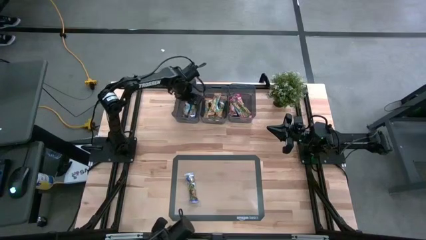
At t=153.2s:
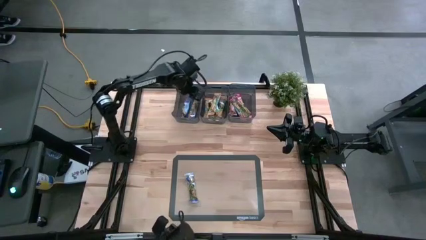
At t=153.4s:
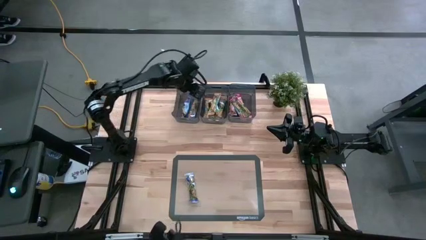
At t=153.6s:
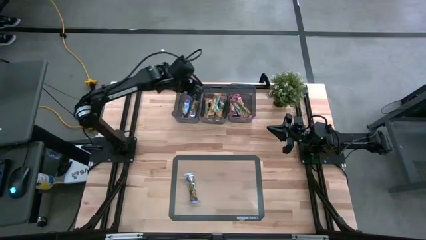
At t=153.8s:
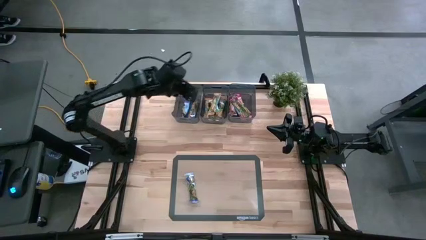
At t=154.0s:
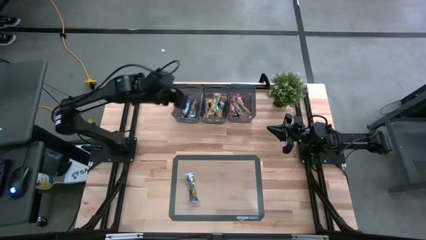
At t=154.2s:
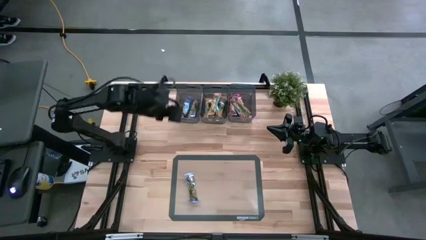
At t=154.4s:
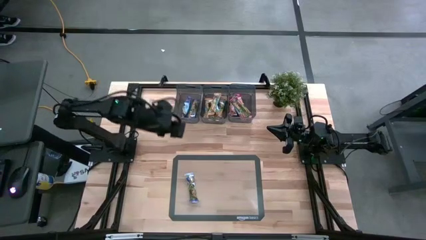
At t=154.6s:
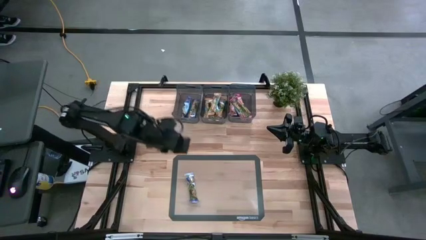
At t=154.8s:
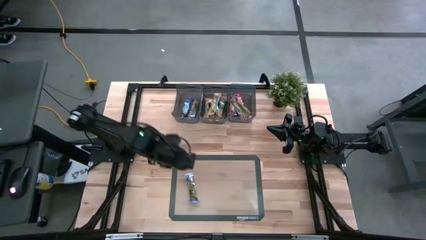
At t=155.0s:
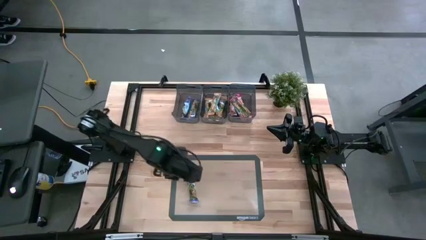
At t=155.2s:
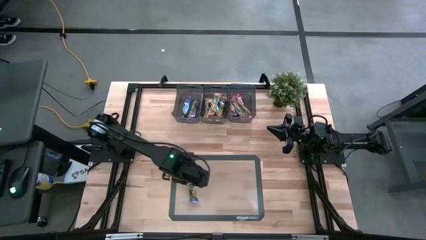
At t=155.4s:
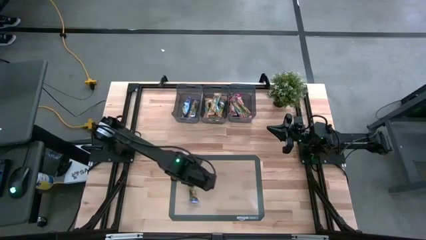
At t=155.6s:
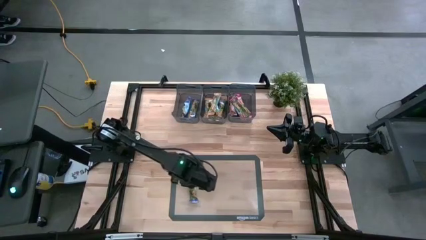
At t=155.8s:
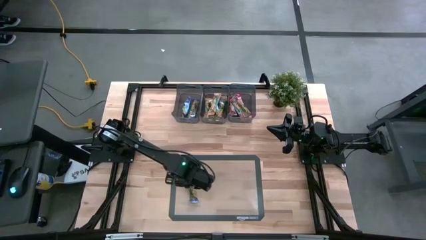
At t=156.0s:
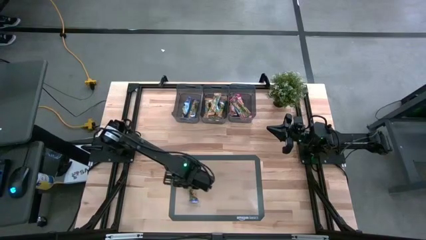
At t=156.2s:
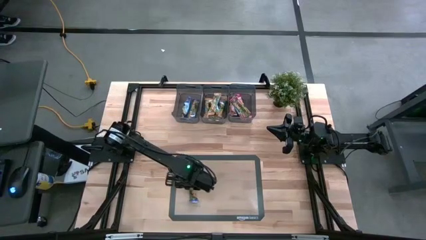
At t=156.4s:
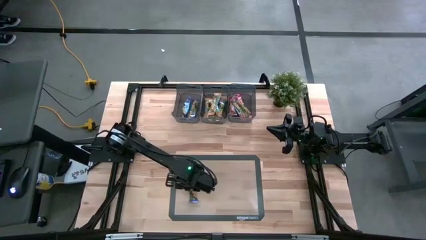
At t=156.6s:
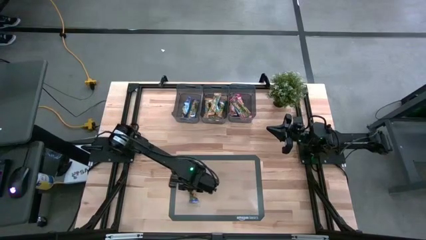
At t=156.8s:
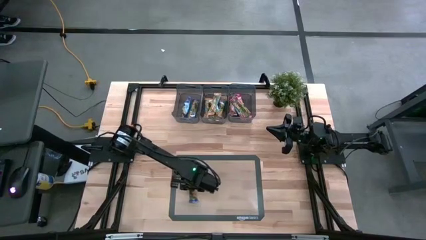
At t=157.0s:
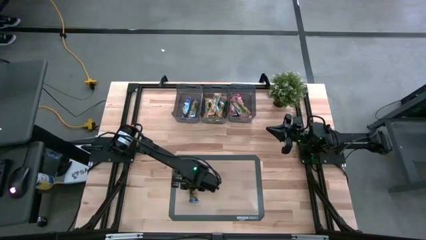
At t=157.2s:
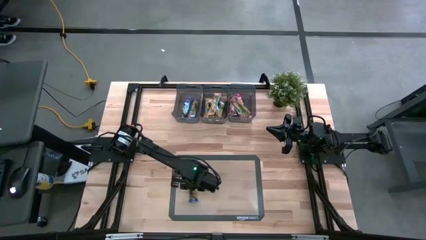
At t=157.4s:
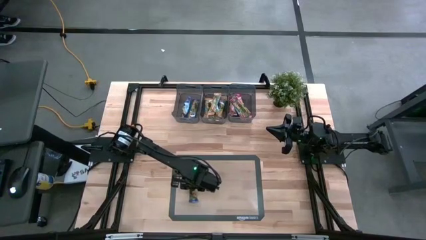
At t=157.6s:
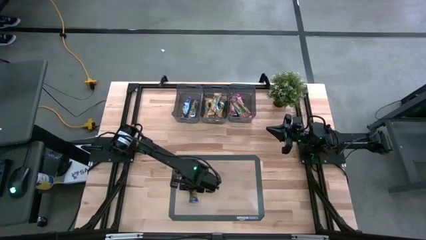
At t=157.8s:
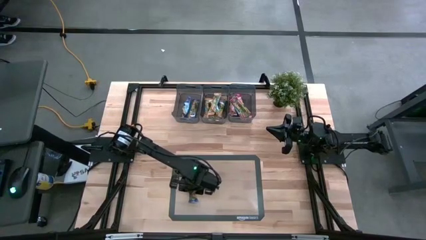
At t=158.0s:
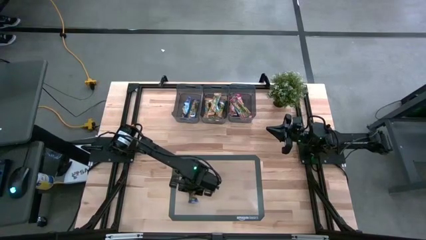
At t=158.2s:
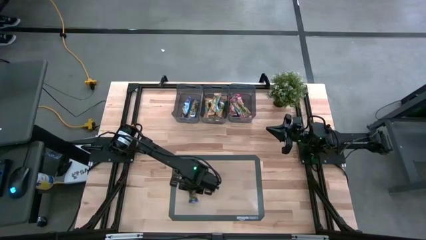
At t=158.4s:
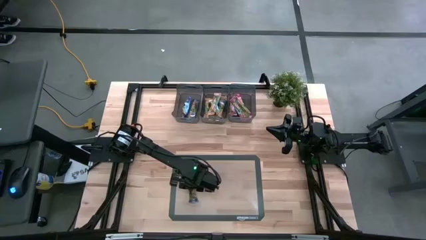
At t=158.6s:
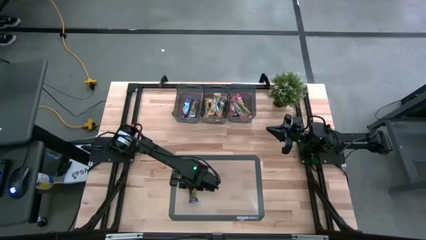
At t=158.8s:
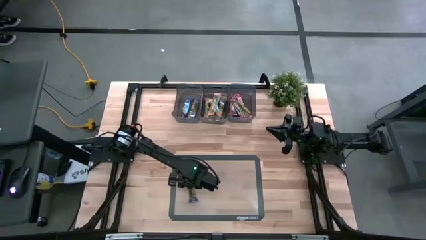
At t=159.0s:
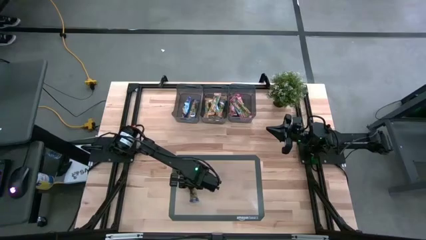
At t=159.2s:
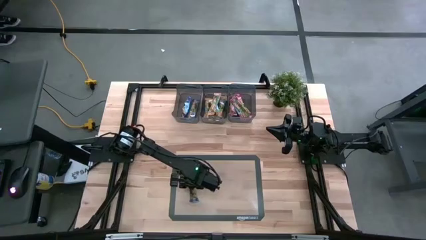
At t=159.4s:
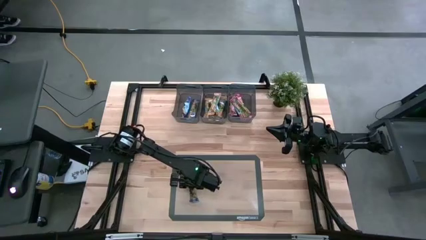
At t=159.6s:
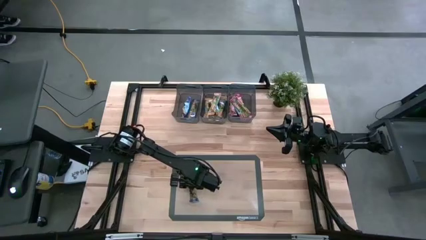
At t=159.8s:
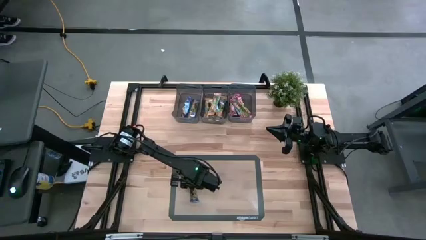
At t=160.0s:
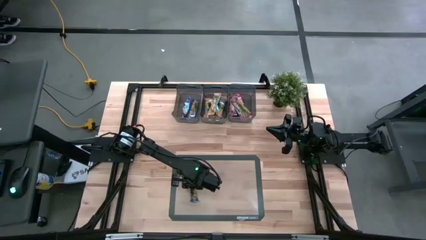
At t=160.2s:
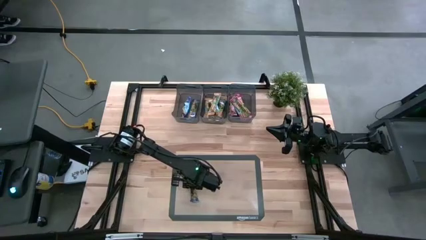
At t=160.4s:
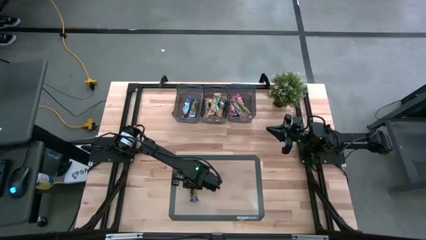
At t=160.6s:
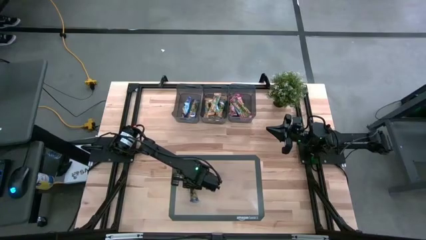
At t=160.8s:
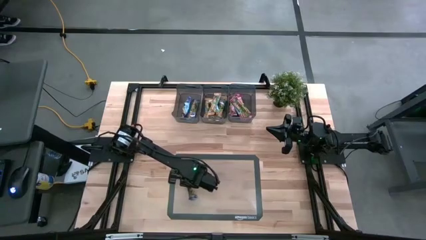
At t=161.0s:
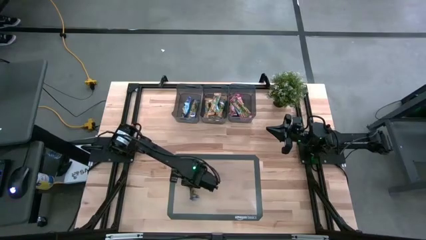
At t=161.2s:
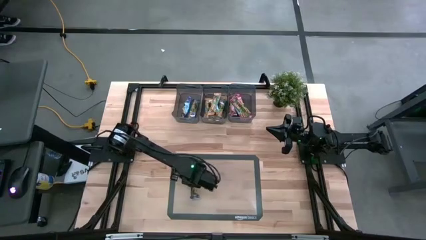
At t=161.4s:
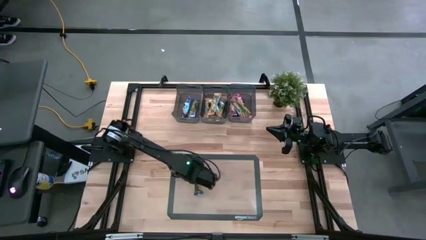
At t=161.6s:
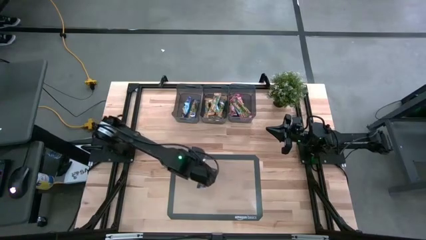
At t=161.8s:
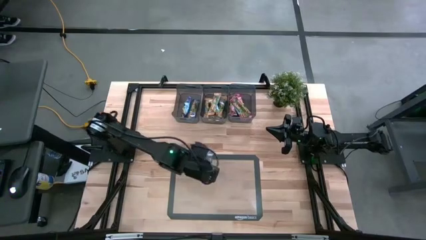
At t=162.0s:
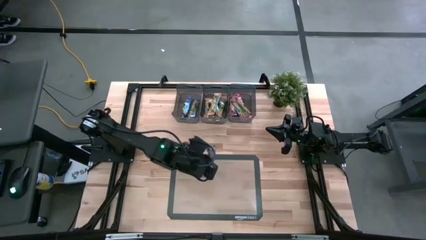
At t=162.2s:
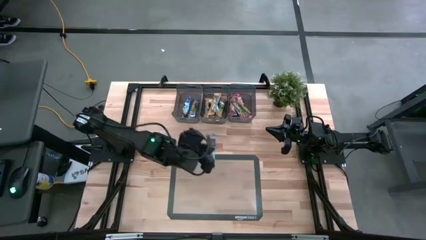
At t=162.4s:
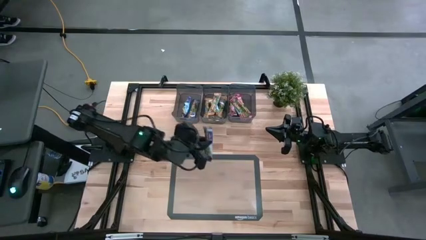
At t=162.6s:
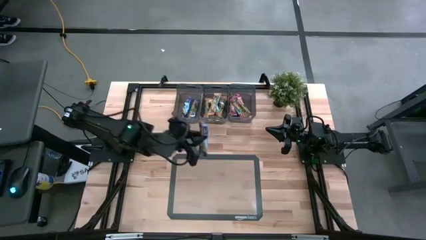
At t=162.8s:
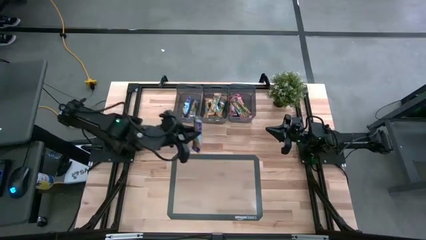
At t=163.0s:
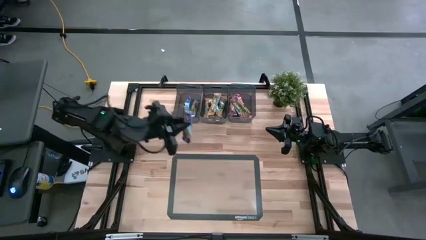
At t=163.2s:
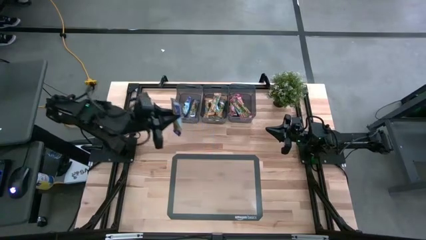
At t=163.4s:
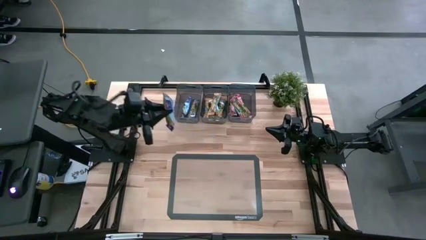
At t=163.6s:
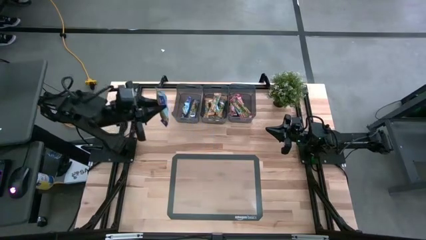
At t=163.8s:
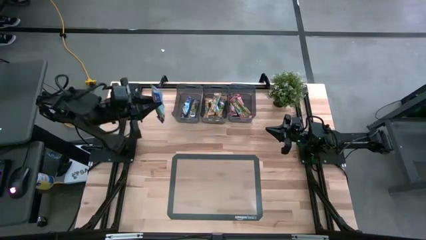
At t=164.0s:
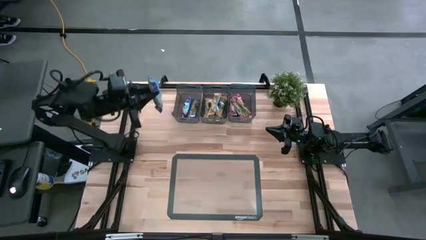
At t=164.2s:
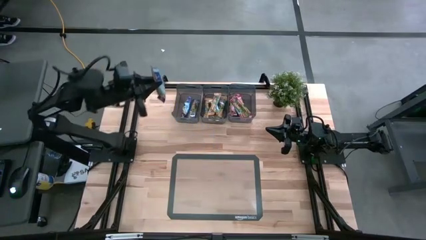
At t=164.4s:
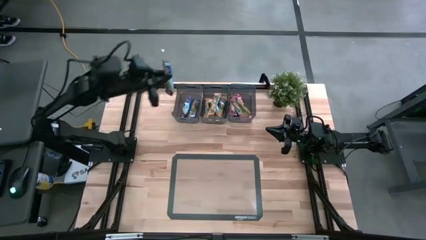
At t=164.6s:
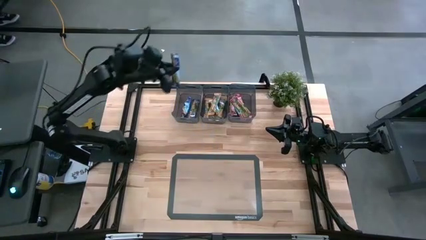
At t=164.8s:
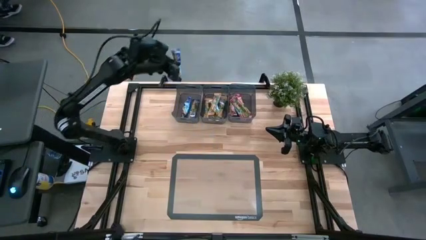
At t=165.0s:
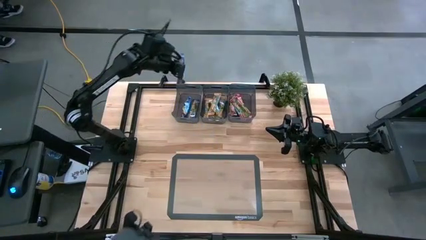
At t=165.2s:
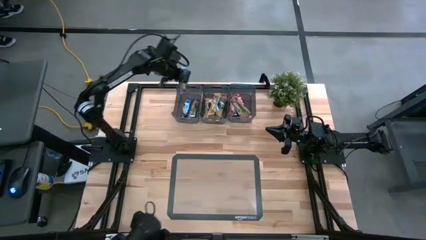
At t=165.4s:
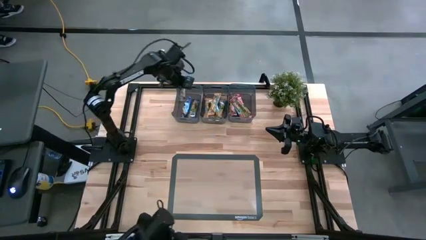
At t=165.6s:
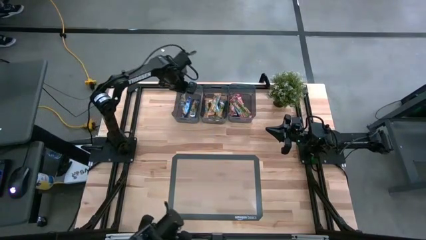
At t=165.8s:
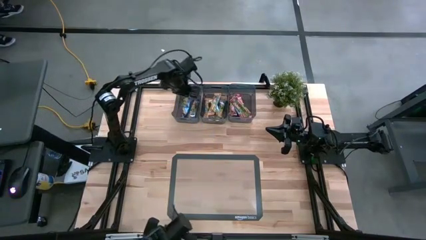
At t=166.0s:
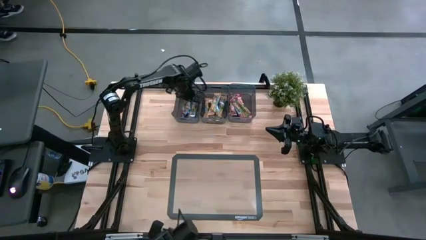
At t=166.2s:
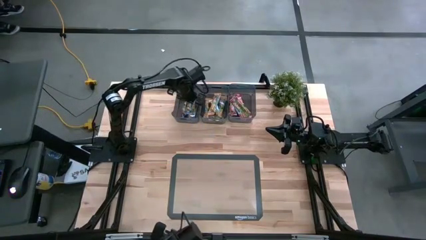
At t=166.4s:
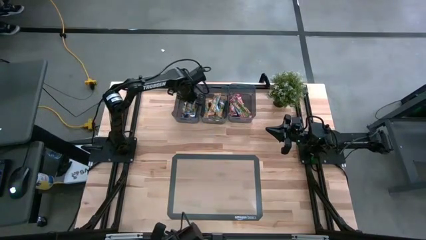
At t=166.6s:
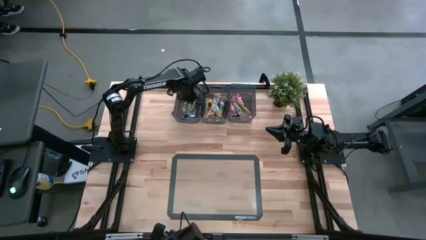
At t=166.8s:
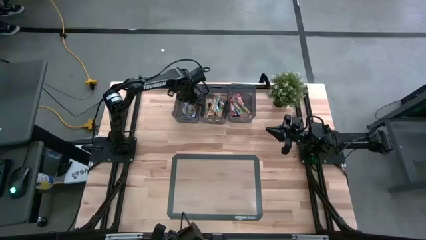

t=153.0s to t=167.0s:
Task: Pick and place Granola Bars by type
Put the blue granola bar into the left black bin

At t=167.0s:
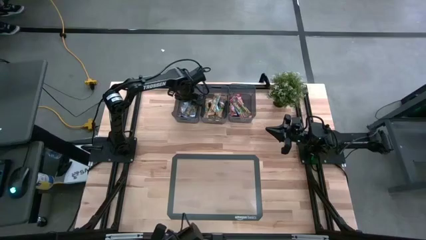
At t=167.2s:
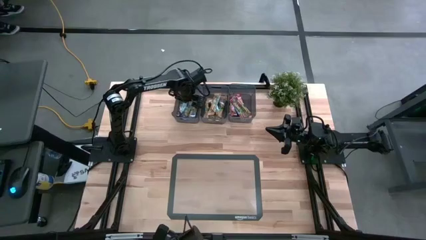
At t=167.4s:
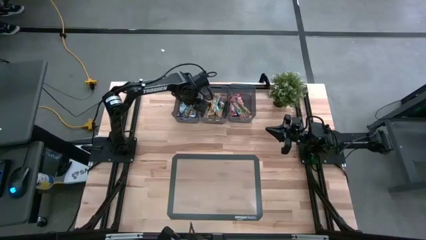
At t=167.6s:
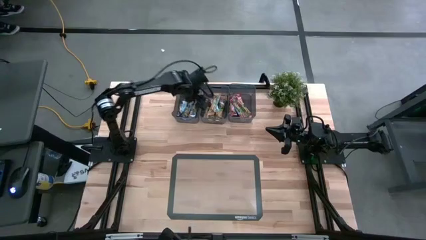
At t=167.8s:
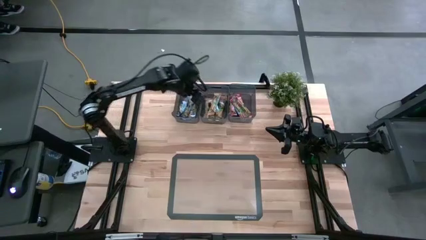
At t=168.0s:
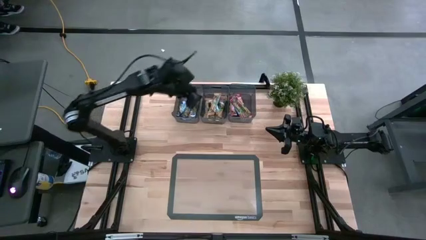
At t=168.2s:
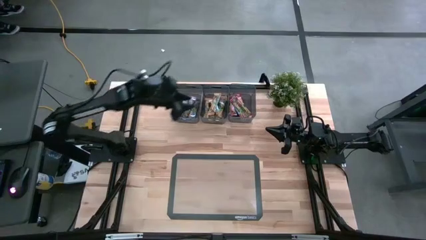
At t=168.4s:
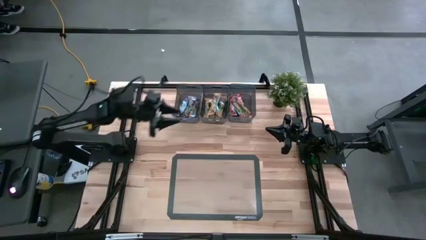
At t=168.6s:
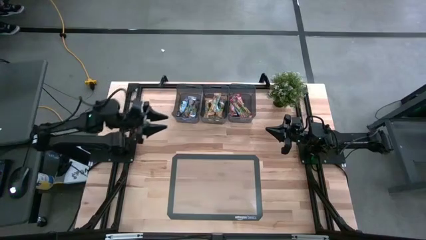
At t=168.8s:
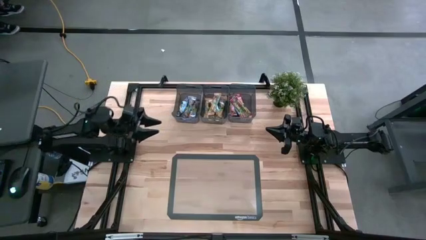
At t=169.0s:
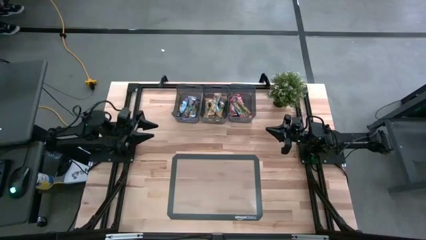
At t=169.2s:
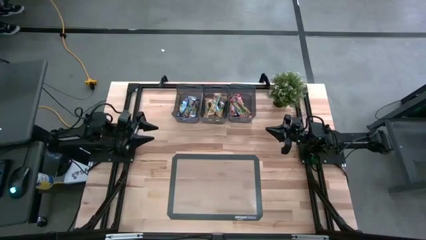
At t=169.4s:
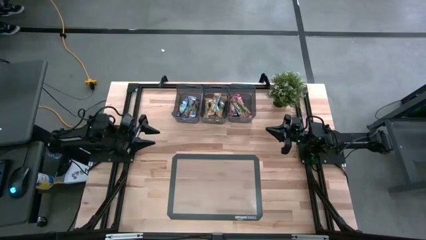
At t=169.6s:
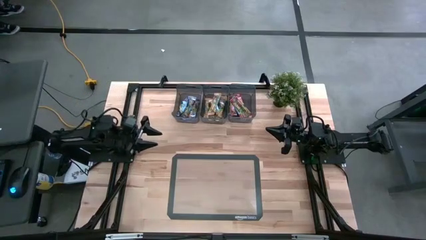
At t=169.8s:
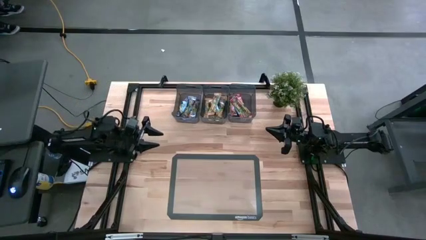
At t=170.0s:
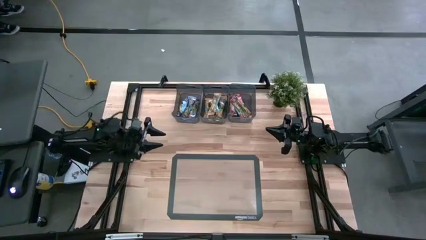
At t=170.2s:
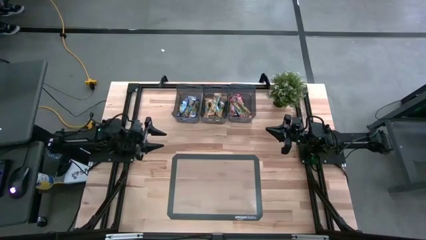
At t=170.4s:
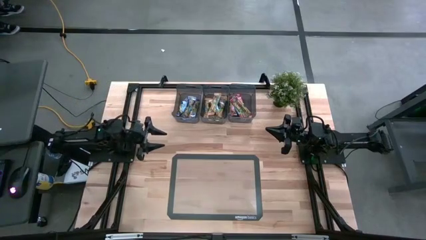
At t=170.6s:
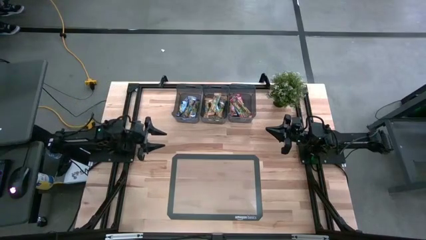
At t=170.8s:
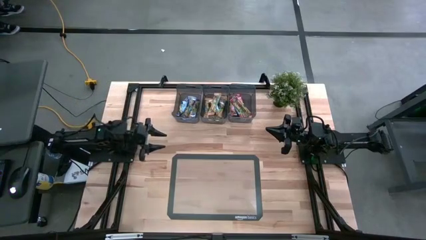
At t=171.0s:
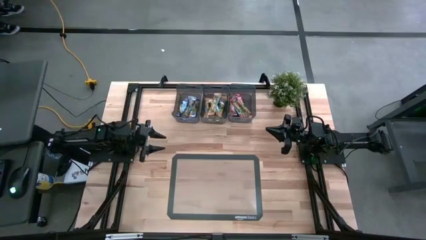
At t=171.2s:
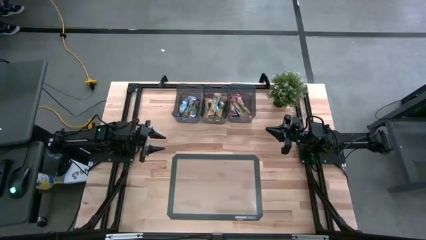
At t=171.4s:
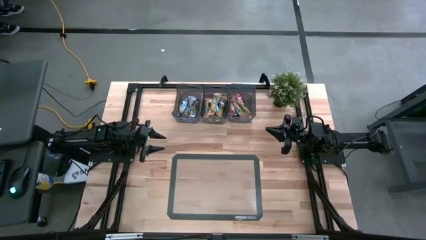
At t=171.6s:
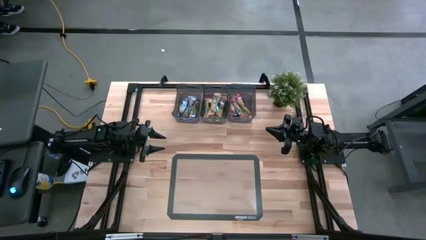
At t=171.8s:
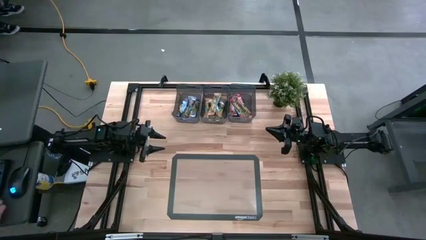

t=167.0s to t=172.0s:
Return to Home Position
